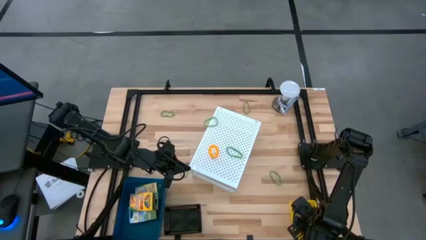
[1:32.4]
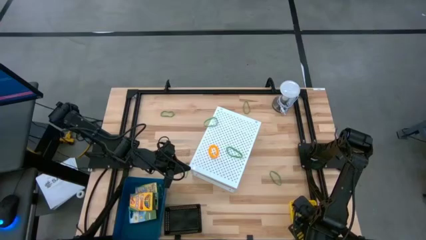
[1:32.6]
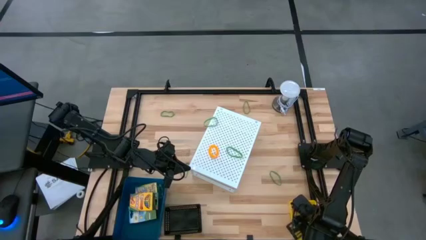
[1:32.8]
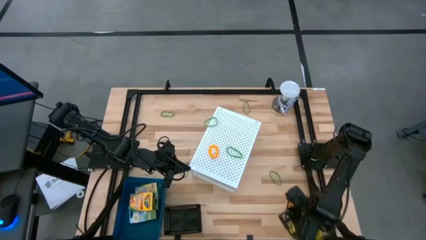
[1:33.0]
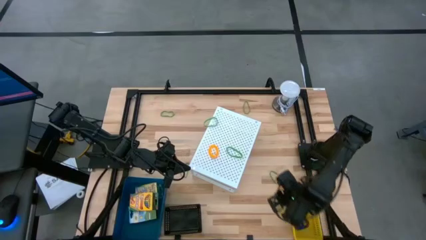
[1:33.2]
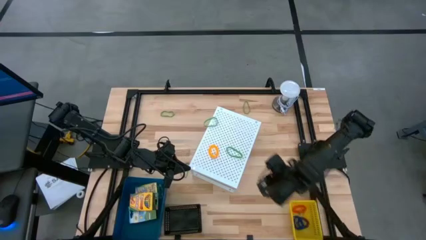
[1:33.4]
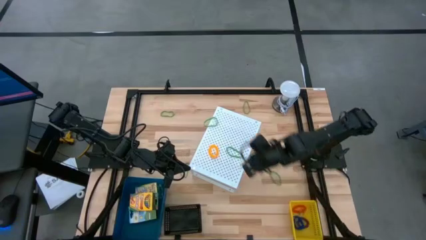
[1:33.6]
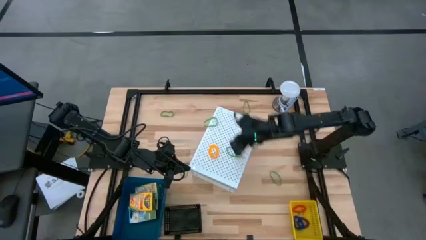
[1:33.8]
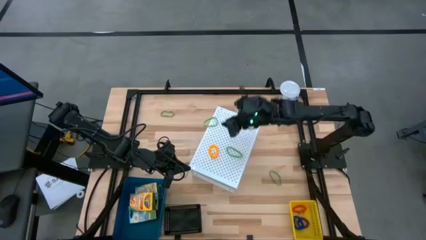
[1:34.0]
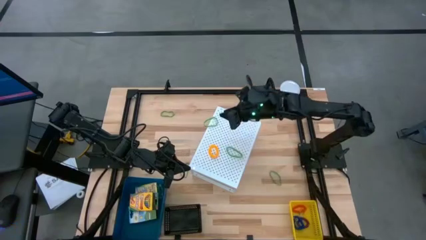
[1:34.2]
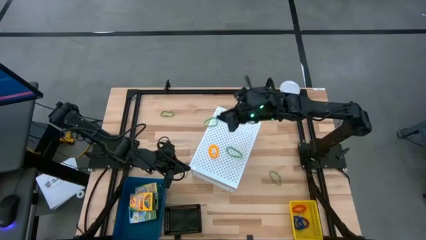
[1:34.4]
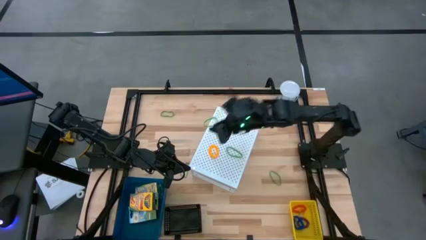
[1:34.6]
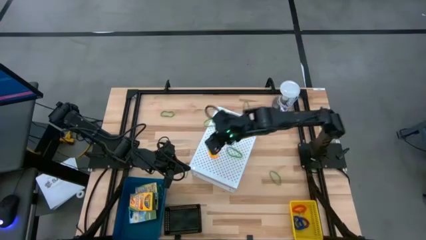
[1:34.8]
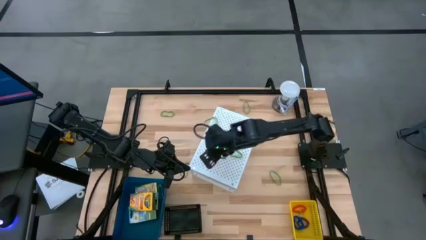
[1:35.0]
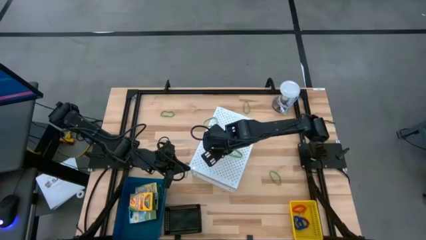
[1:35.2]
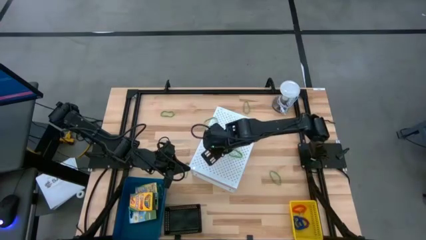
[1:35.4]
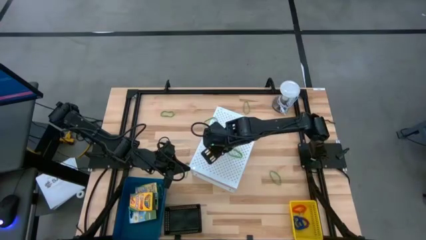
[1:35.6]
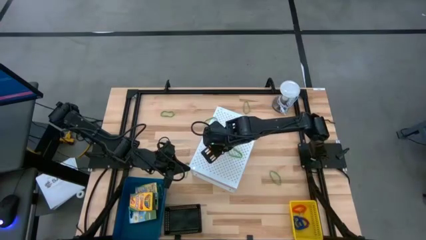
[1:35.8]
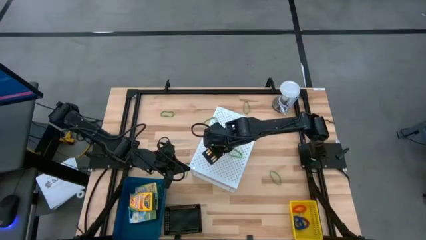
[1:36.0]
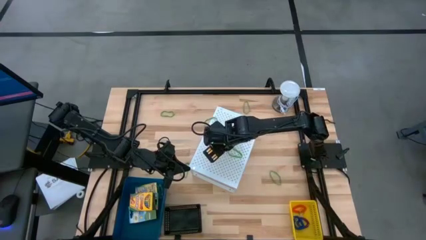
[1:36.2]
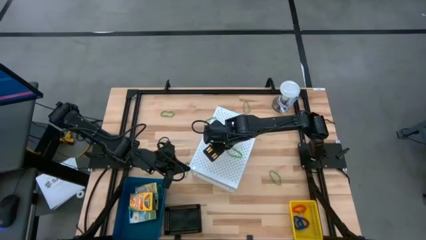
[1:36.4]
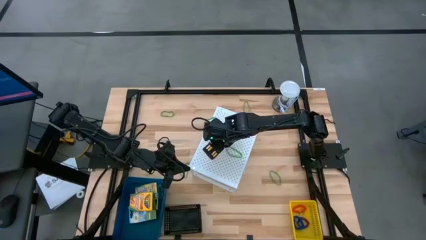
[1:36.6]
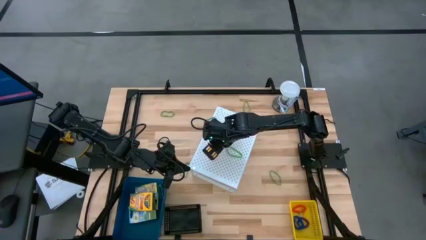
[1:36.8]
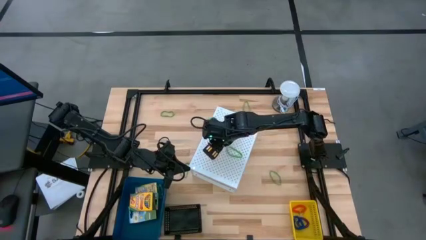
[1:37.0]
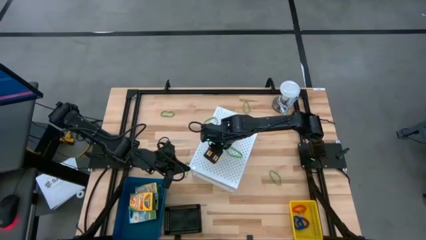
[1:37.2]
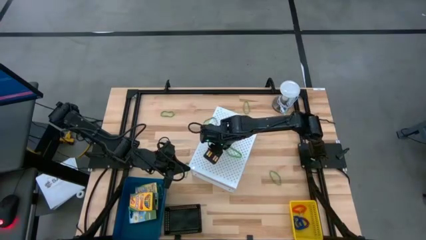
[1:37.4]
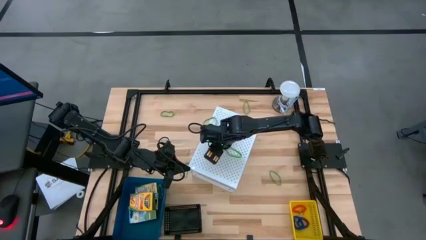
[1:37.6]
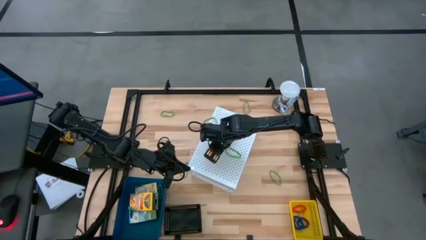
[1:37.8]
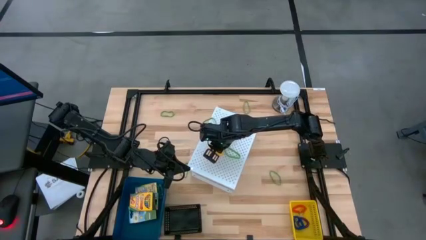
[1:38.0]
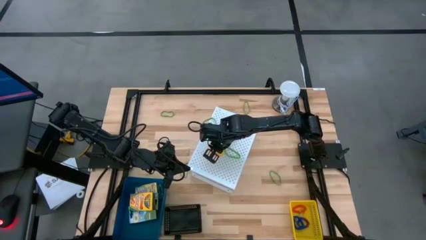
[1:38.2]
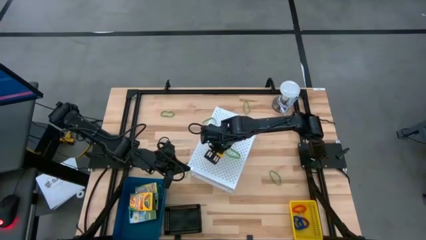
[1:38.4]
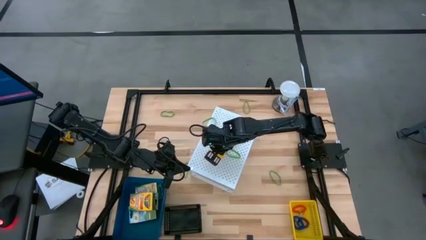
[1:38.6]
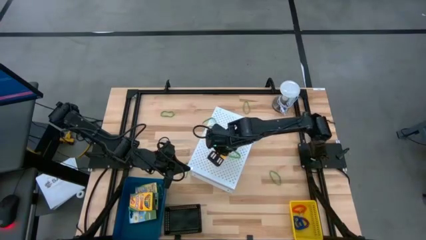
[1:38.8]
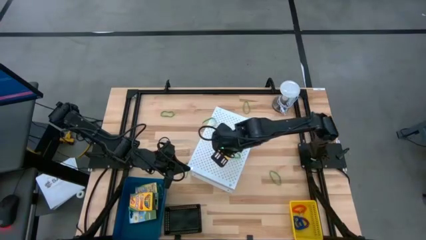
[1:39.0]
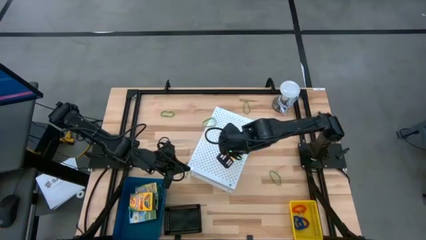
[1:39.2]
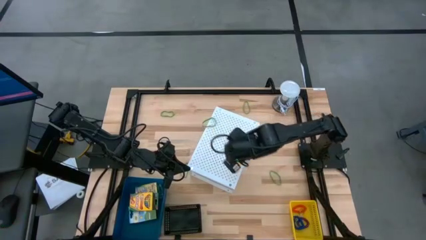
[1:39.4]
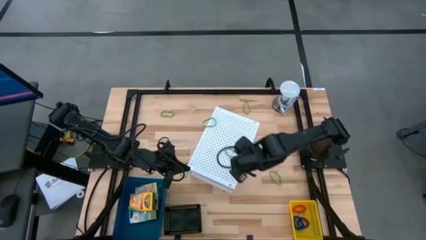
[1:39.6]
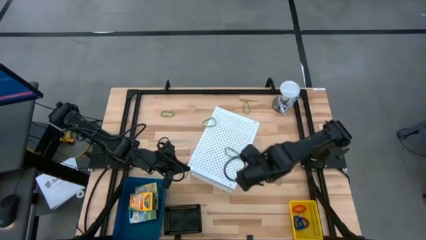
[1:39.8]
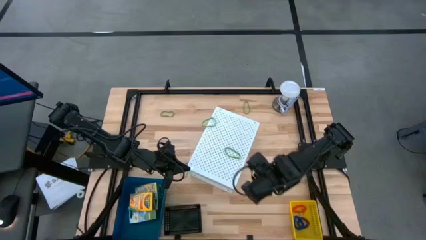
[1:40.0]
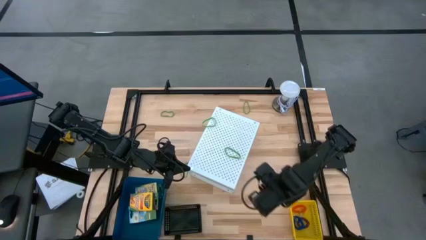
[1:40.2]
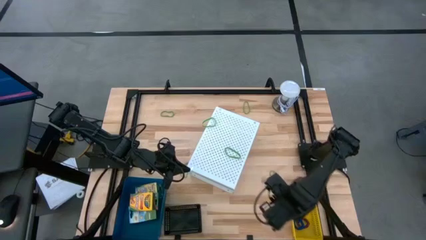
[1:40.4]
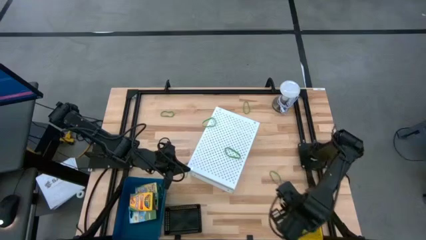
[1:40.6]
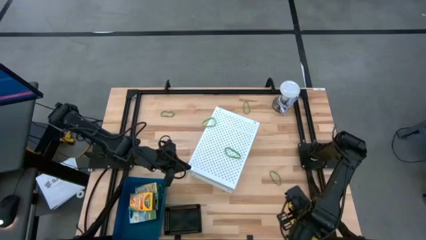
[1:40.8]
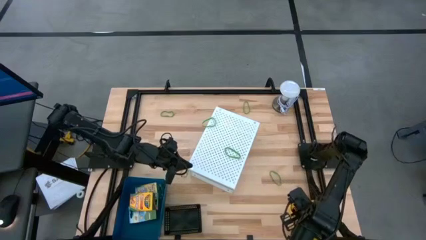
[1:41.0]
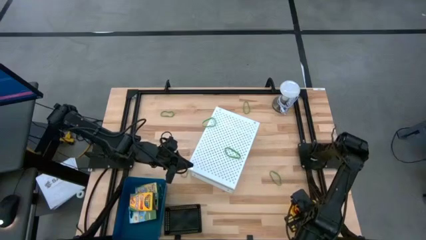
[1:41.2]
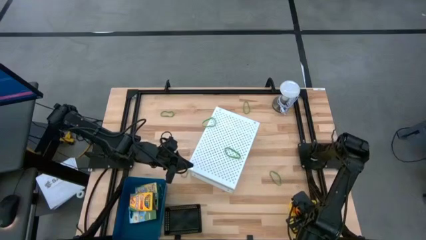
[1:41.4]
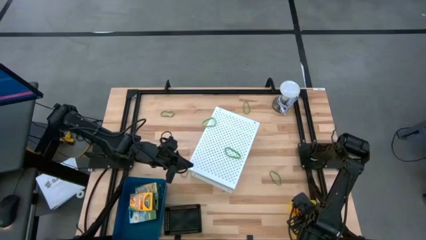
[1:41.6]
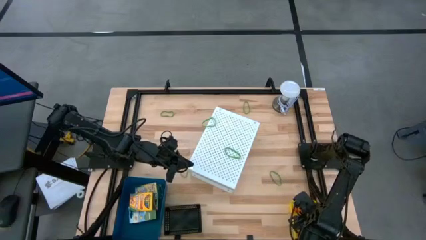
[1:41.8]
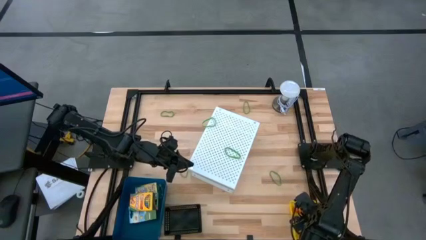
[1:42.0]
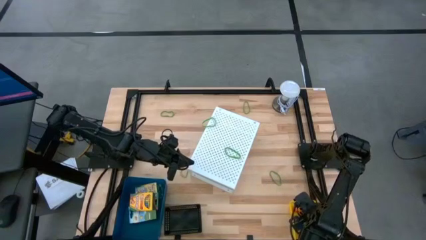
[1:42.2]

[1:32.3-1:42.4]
Task: Pick & Place Office Desk Supplies
Put the orange spring keychain into the yellow bin
